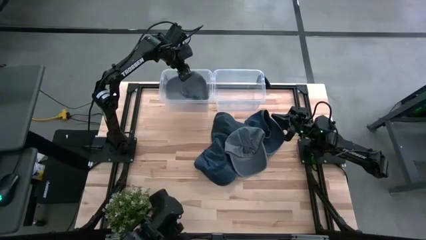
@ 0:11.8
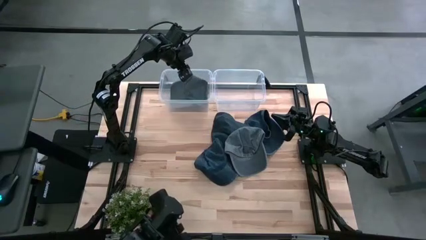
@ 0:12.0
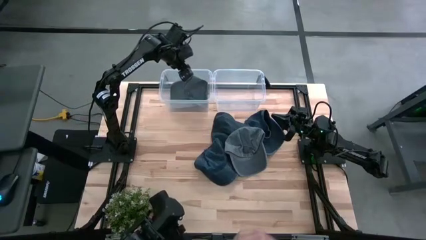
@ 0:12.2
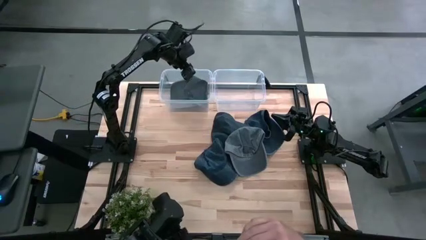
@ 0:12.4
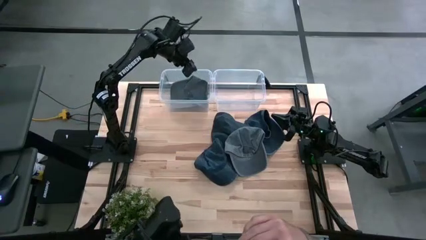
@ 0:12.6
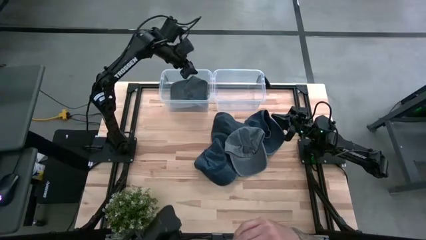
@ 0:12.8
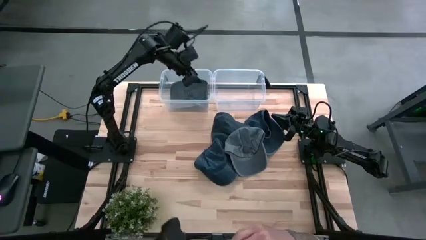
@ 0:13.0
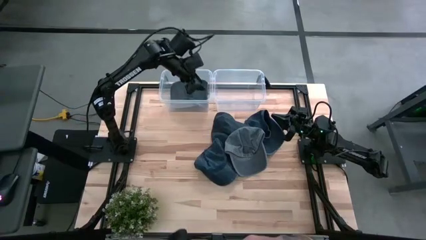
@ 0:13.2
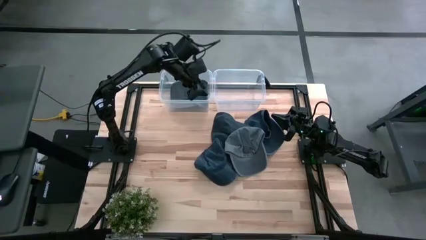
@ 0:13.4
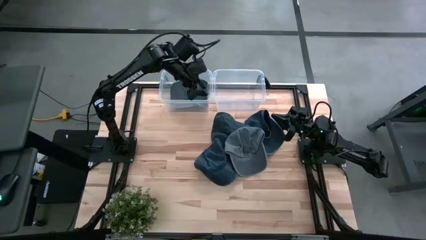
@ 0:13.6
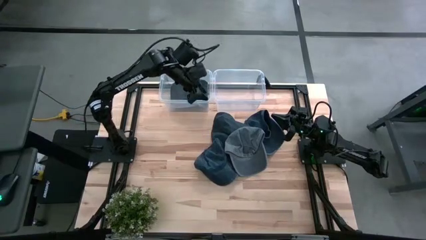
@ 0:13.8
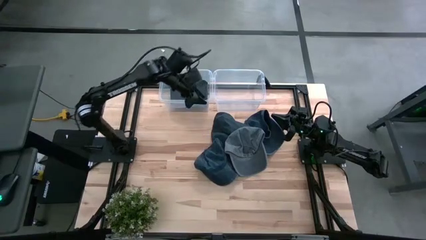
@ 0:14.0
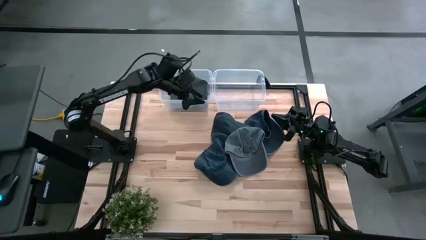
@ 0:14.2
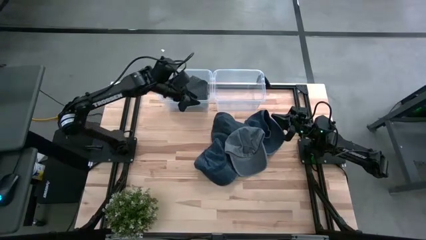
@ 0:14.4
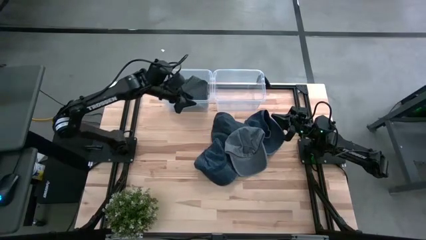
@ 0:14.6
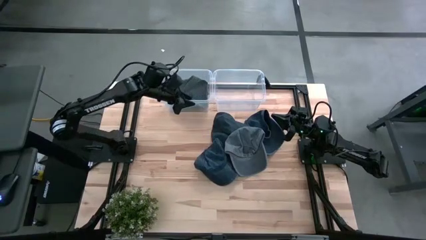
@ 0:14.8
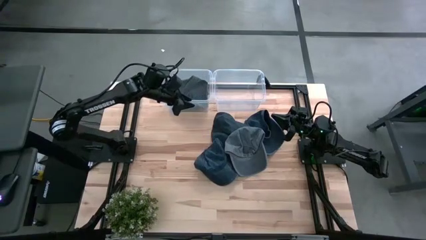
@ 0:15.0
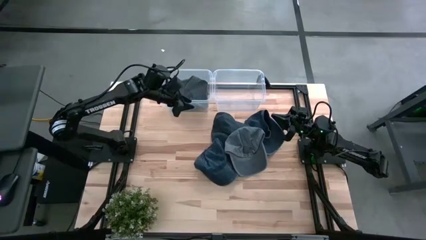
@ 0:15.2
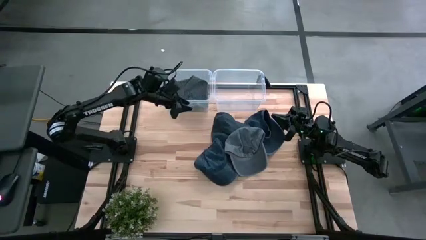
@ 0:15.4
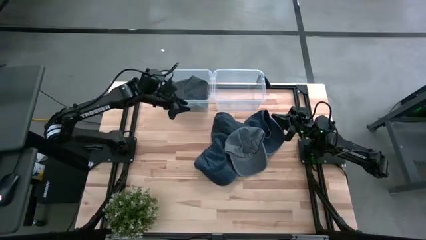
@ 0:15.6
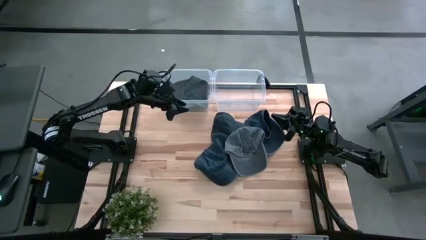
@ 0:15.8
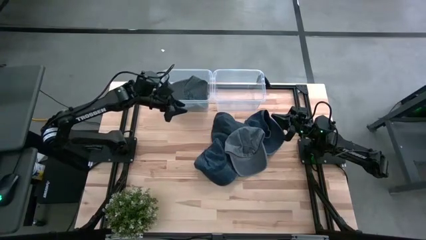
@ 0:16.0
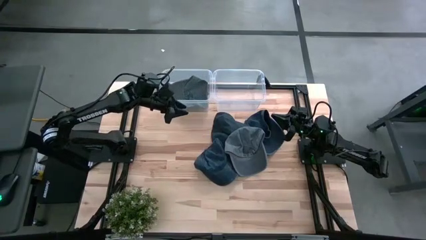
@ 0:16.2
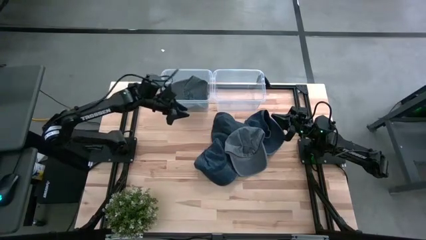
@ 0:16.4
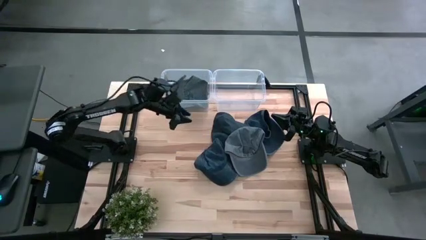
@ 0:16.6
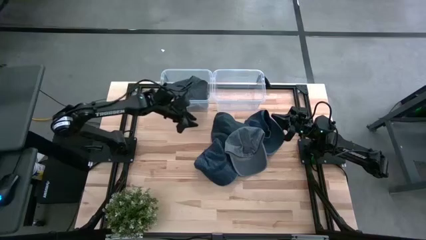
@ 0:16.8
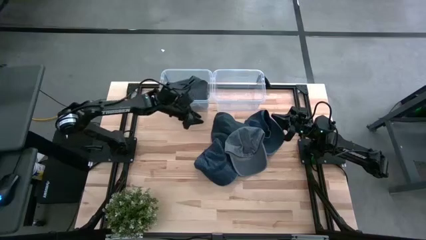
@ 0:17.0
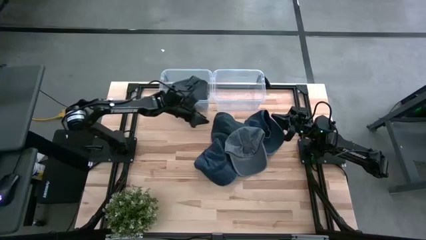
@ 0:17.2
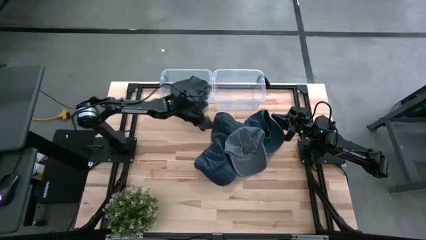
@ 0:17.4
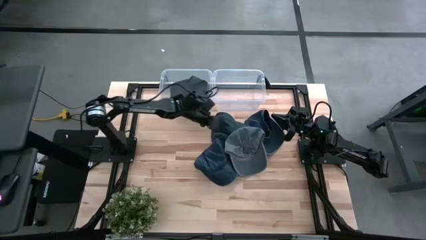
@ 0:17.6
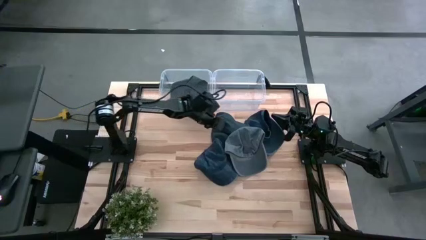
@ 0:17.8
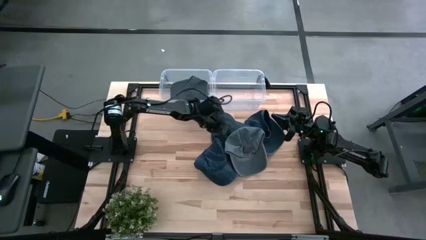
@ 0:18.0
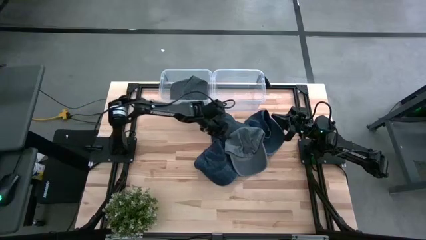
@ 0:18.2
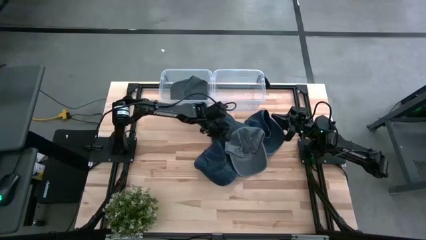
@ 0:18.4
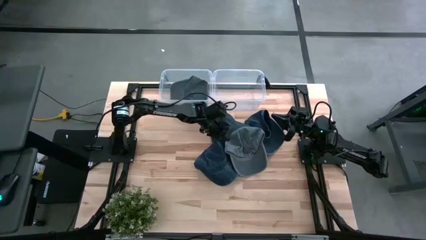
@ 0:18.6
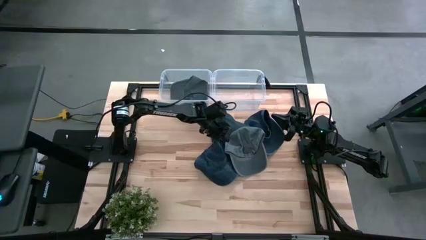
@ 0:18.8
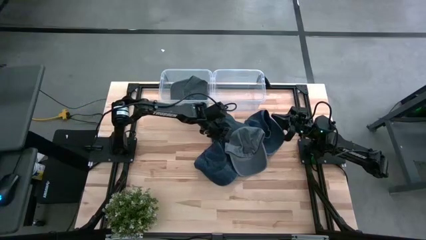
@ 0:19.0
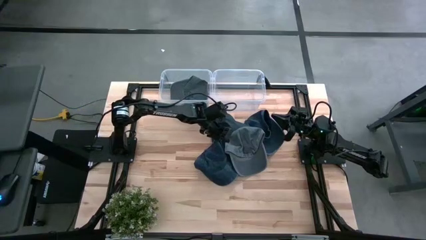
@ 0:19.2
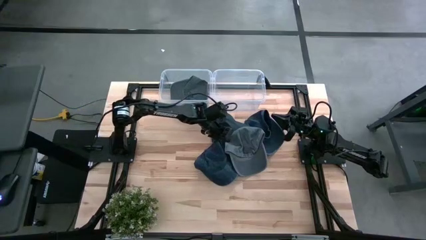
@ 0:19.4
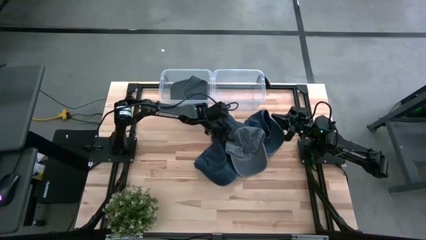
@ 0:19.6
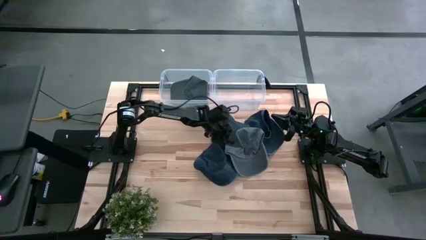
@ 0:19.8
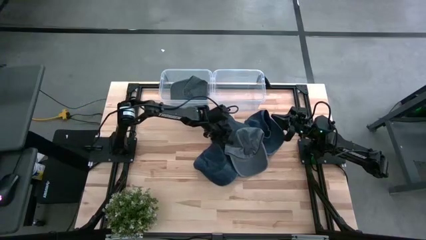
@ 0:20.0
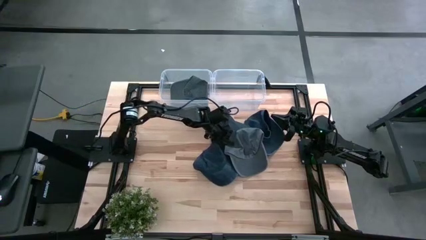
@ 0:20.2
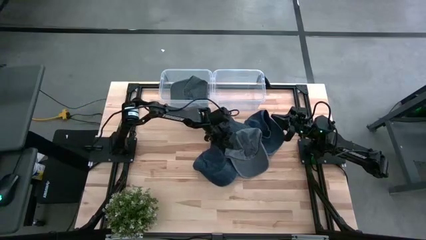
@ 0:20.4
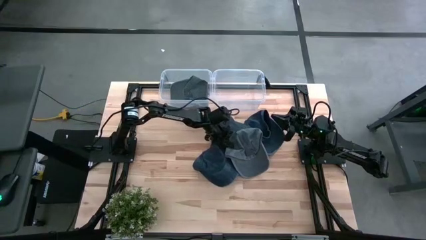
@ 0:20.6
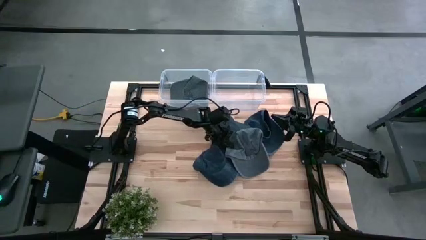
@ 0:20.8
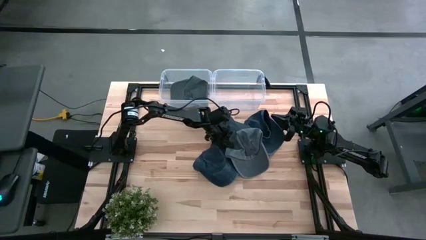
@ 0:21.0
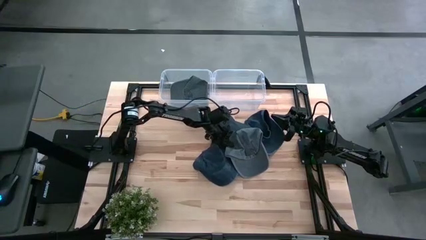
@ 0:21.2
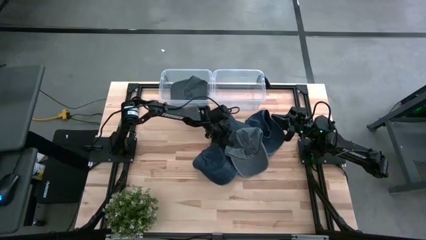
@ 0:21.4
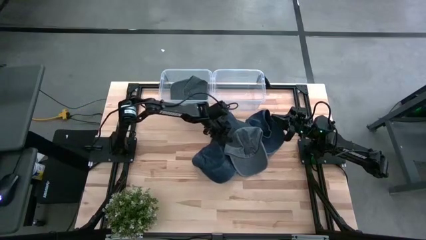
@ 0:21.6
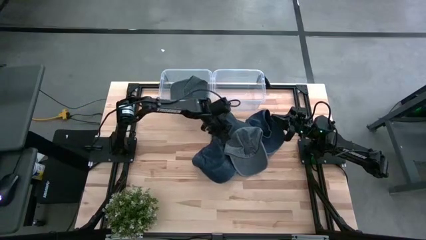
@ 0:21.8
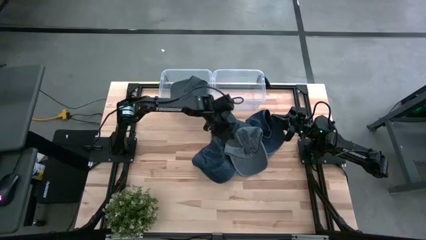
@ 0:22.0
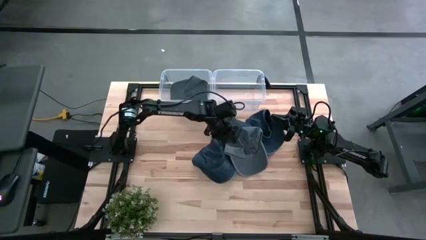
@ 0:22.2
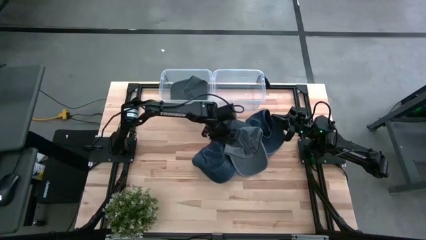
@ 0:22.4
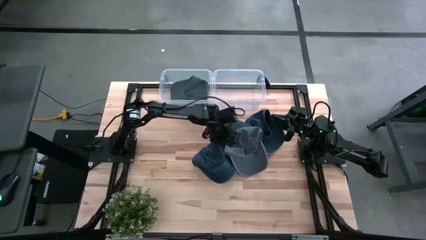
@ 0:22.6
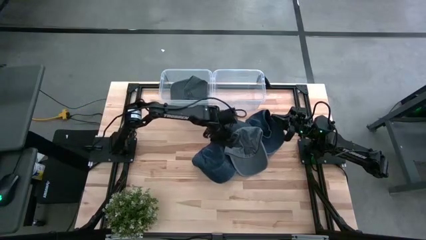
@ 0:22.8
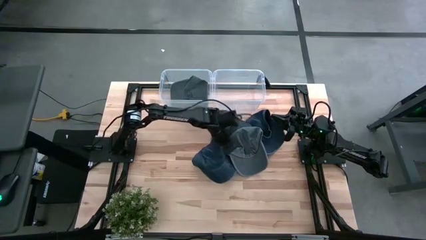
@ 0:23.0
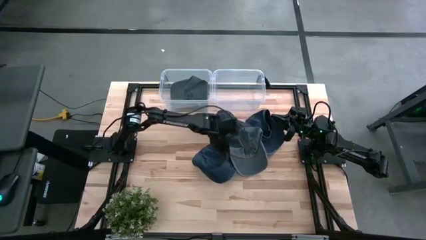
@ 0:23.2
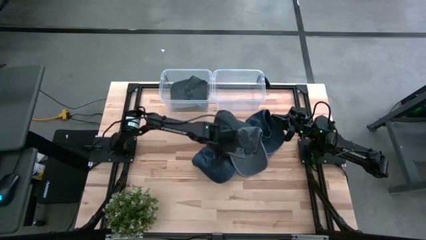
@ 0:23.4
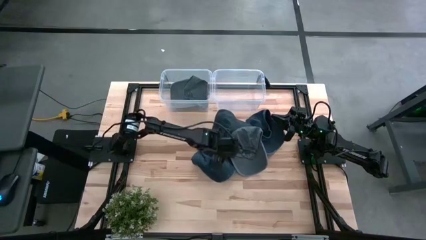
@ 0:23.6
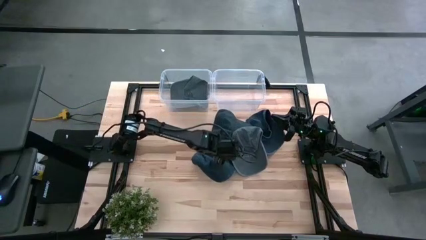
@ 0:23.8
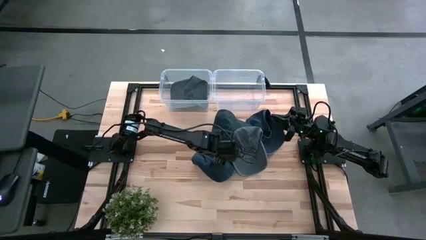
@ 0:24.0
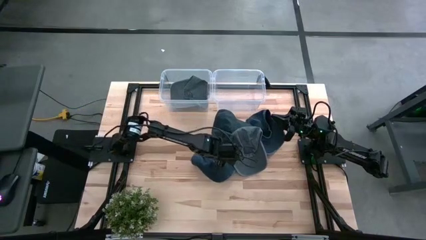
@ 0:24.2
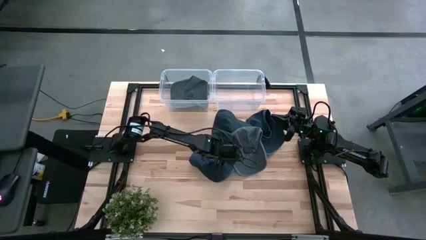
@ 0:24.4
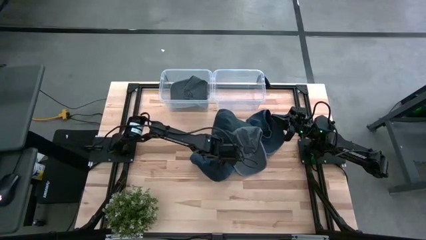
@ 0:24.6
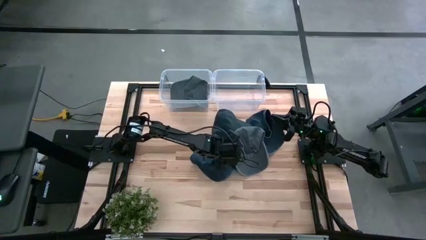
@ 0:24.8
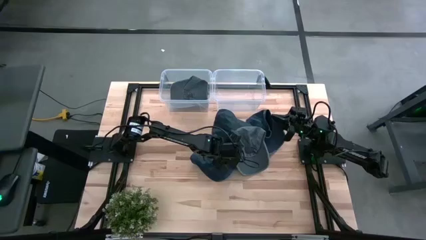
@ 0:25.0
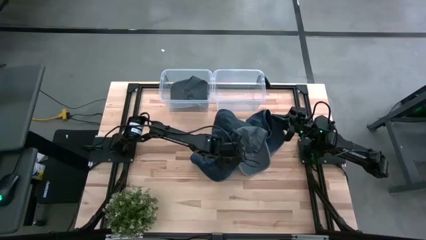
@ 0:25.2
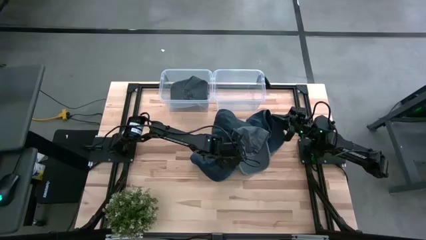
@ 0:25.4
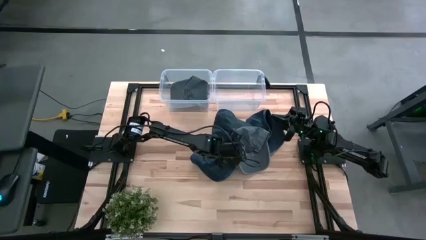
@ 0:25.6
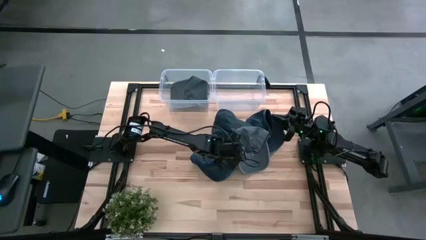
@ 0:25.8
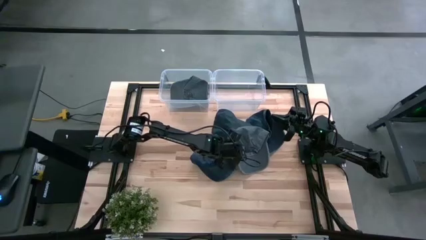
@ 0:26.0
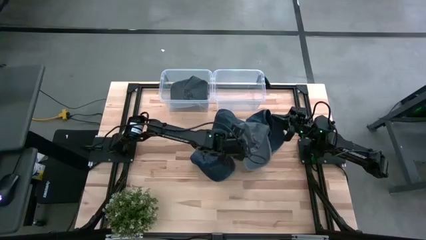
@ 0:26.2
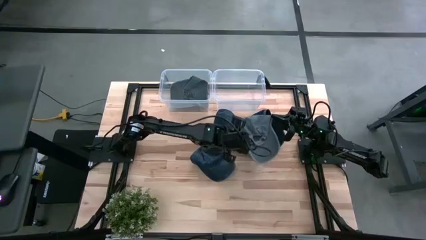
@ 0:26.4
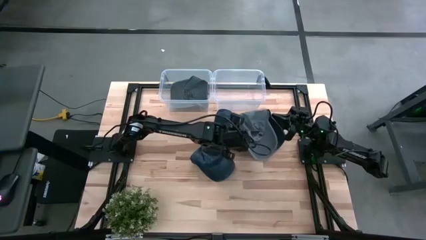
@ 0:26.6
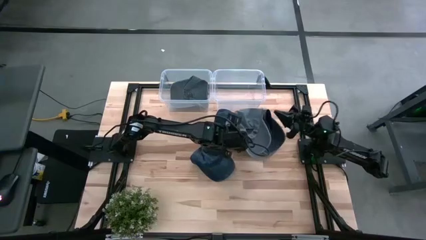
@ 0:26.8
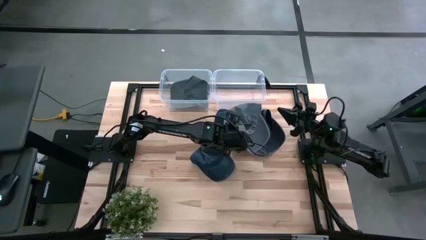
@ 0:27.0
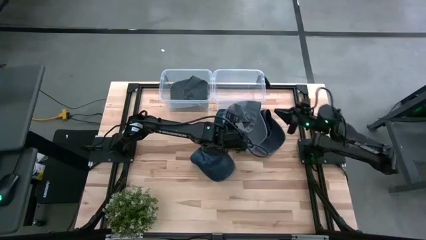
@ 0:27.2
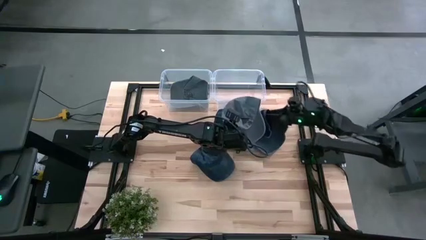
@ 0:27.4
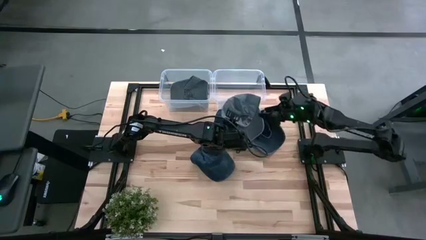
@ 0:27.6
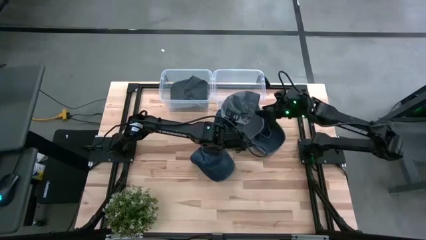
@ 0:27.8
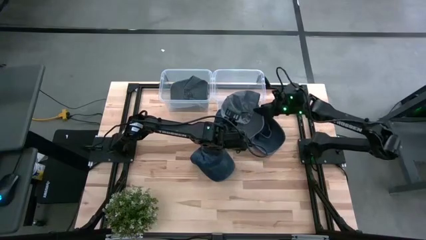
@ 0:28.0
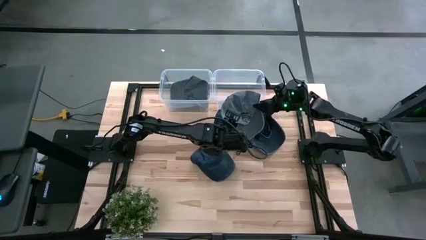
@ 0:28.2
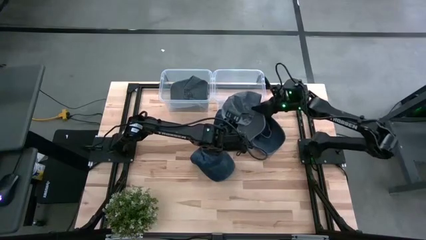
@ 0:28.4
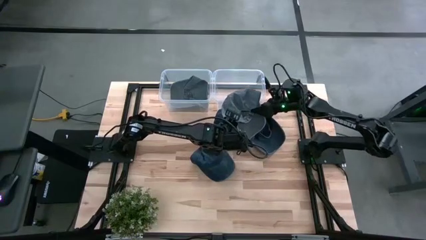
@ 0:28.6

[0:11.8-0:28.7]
Task: Pick & Place hat
Put the gray cap into the left transparent bin
